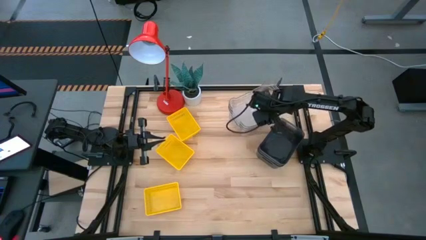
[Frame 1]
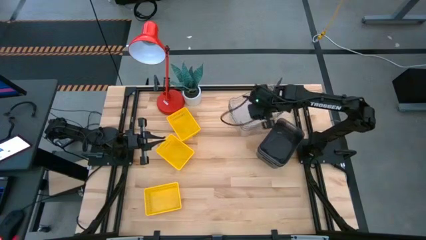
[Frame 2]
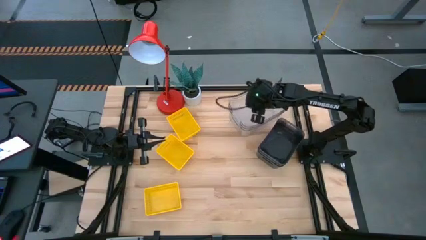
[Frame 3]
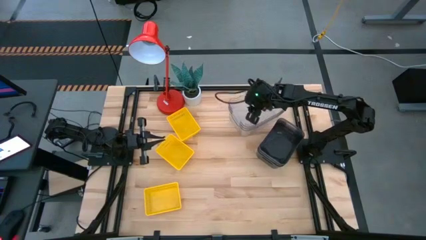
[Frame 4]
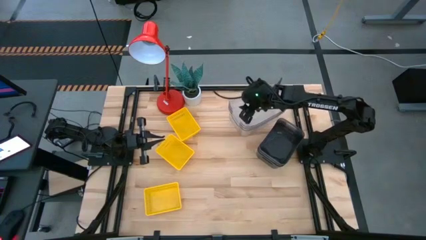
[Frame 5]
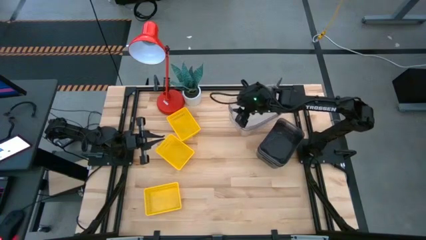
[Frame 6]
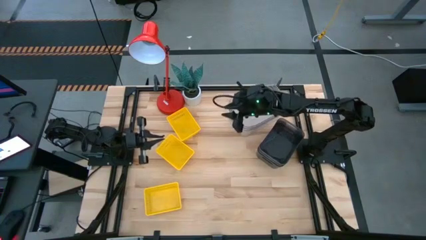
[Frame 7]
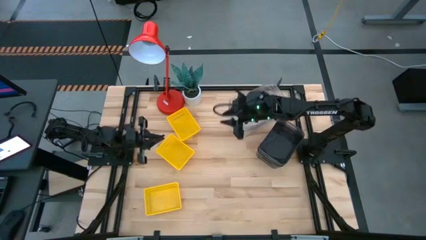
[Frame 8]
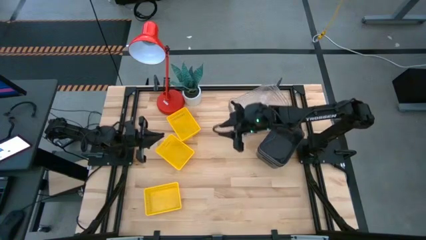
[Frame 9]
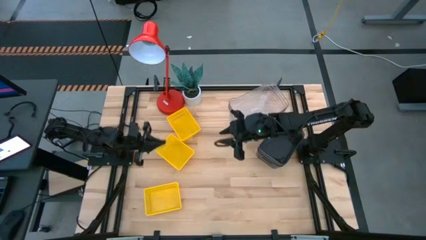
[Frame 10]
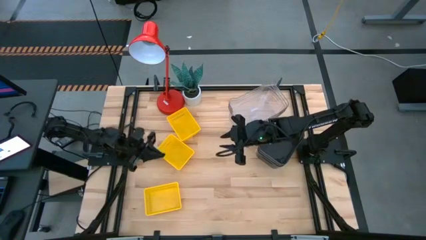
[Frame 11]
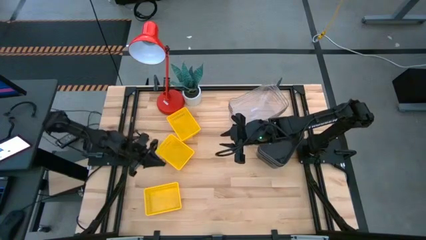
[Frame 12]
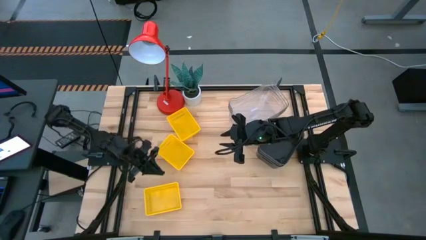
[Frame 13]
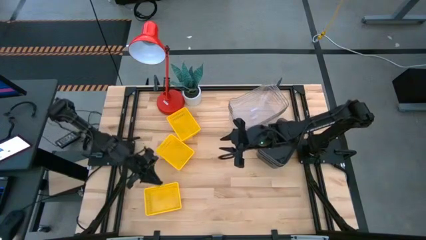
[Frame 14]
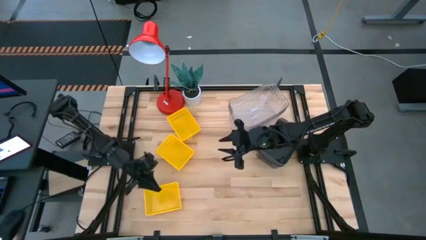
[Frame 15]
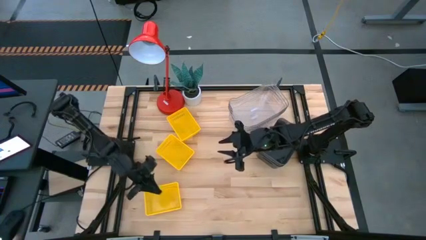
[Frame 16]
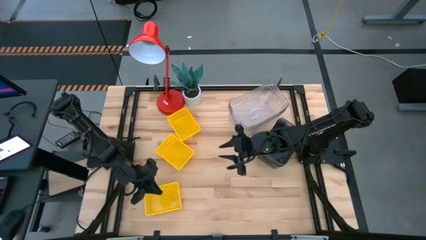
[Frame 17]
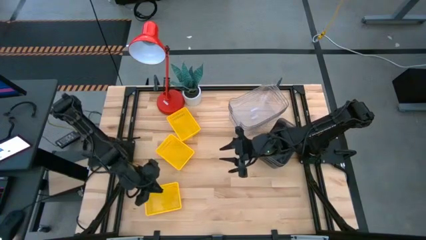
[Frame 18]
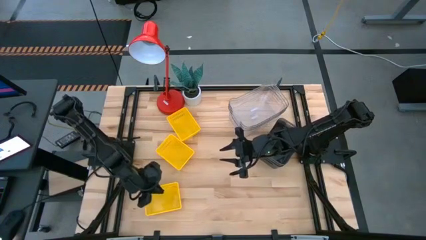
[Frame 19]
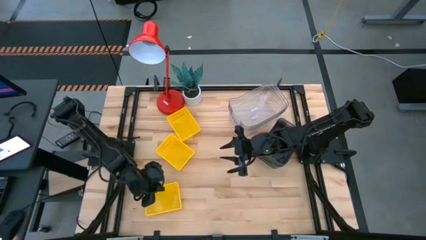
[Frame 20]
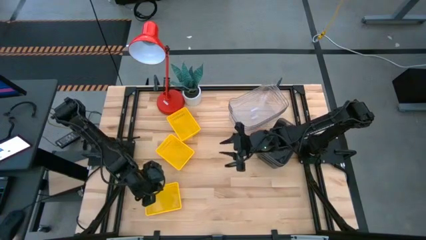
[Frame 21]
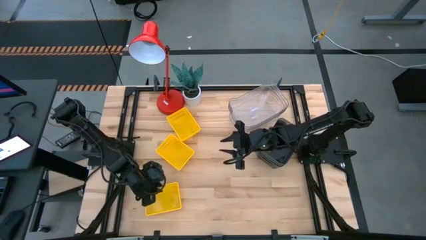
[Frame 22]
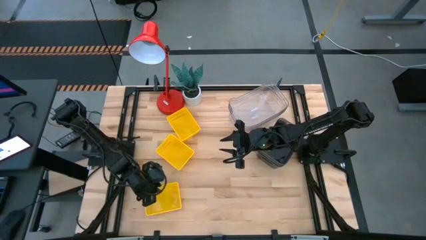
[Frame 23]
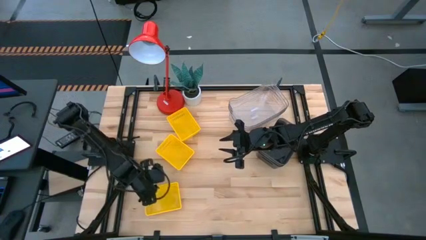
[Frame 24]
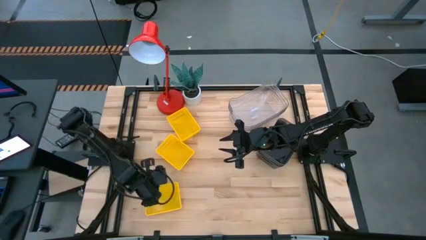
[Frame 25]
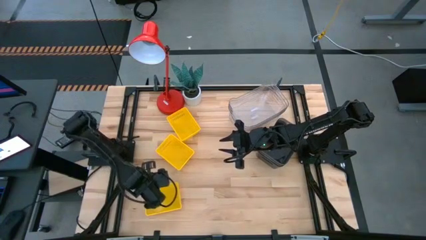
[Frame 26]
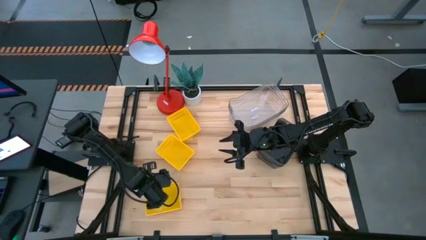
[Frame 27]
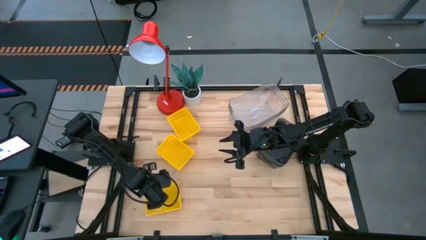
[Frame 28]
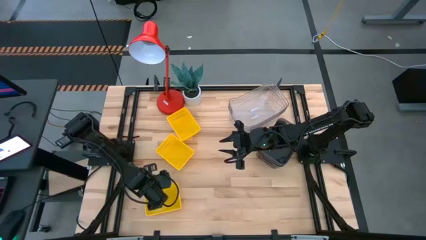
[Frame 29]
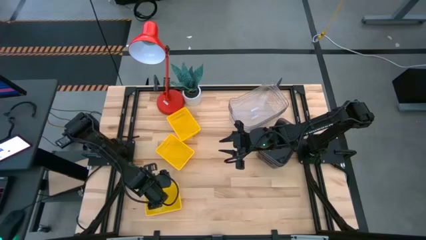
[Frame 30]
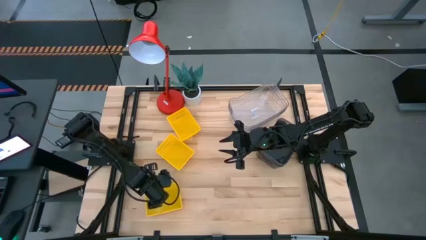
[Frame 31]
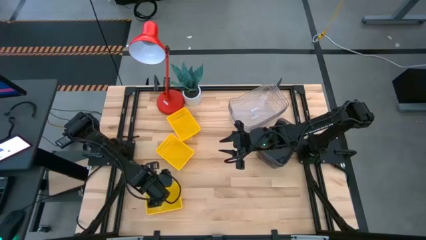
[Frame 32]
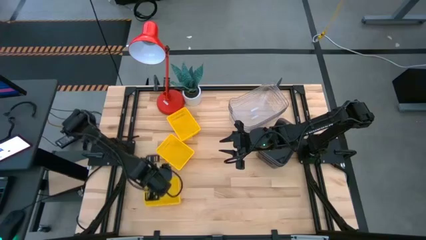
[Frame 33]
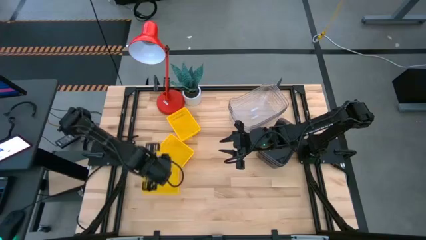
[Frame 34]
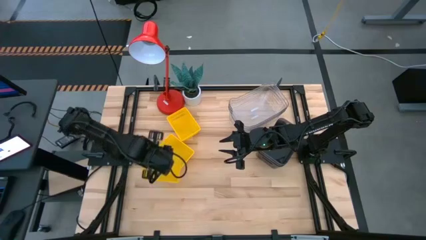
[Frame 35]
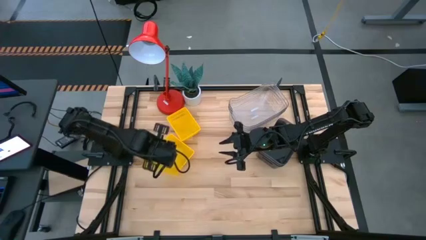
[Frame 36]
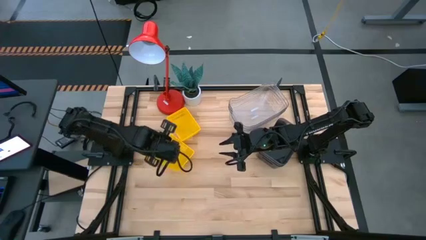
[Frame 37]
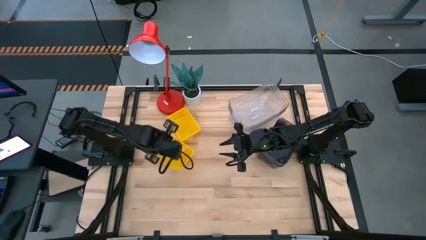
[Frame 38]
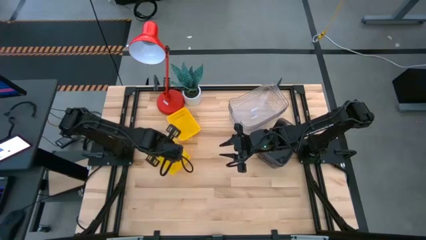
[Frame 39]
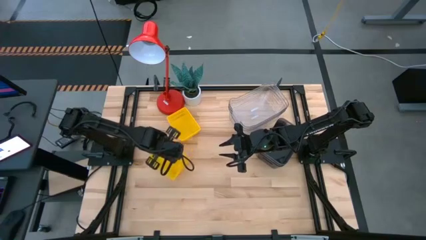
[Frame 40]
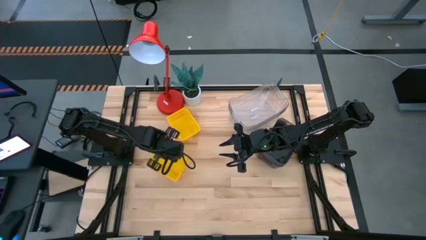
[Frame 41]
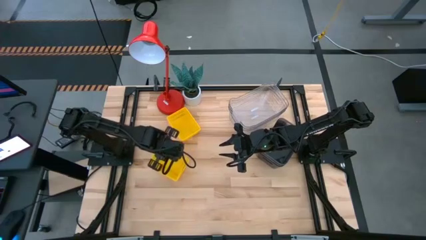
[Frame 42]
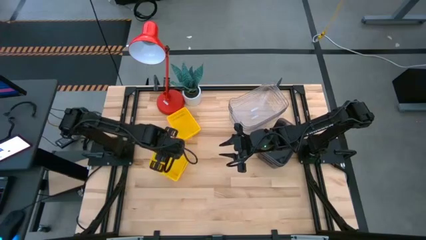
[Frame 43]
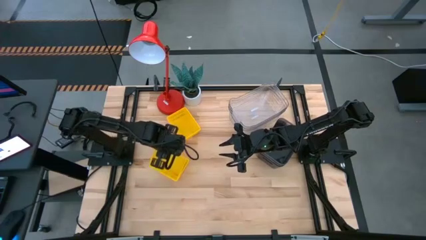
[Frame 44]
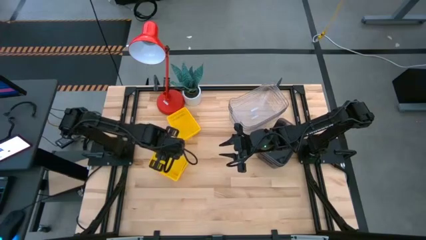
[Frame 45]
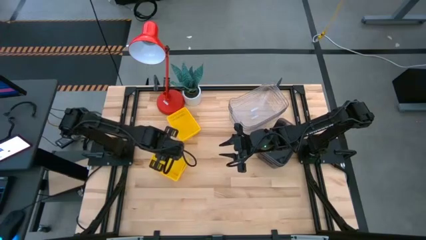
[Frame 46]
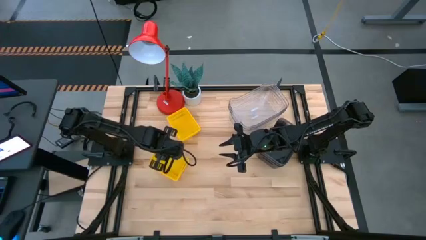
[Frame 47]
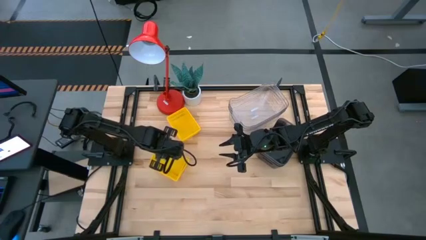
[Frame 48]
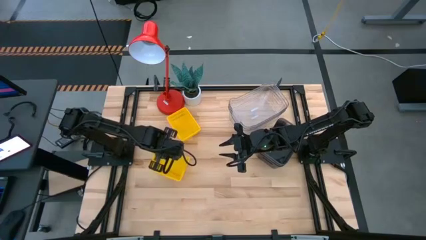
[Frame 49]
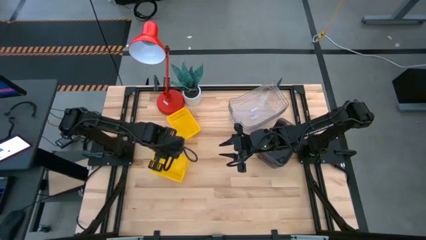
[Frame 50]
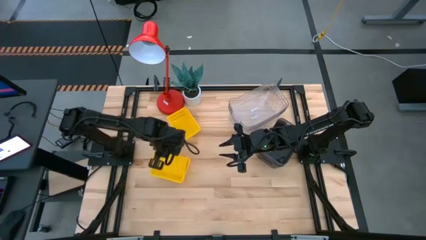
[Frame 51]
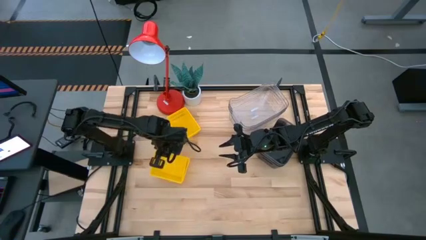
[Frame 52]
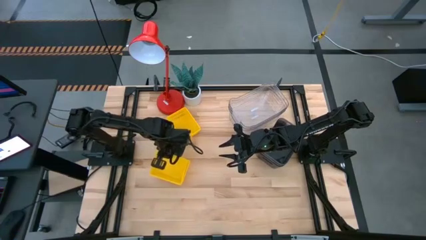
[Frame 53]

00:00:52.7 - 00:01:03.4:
Stack the bottom yellow bin on the middle yellow bin

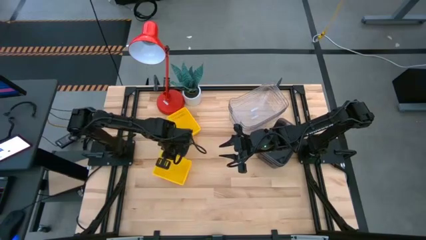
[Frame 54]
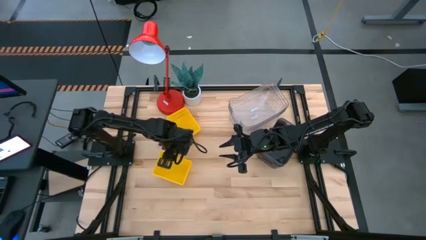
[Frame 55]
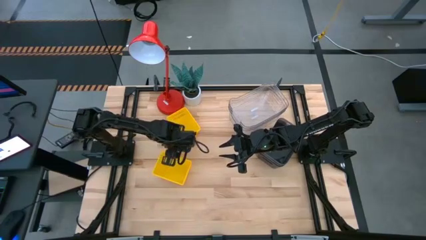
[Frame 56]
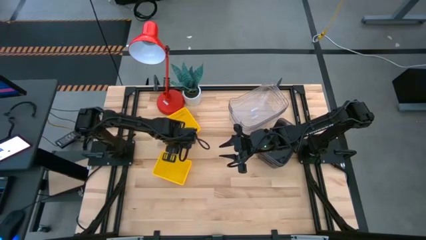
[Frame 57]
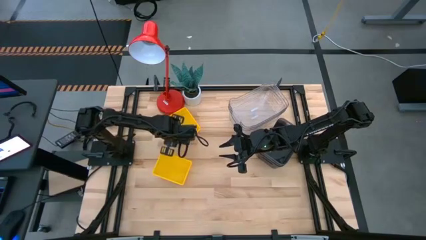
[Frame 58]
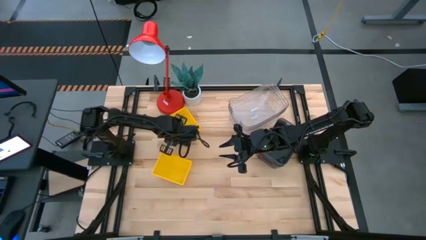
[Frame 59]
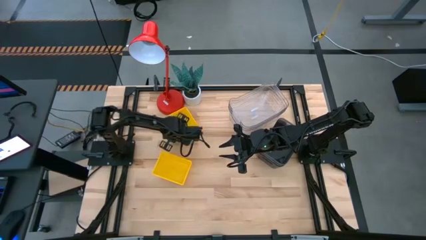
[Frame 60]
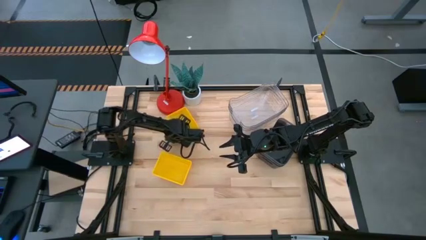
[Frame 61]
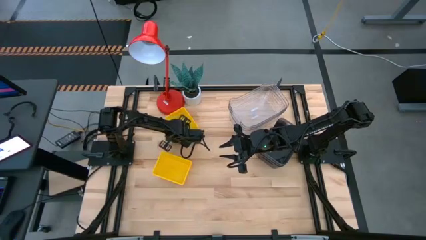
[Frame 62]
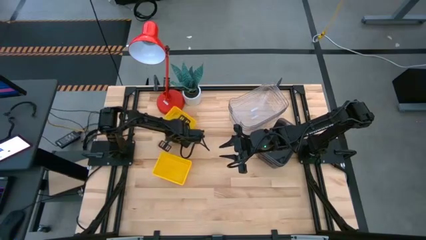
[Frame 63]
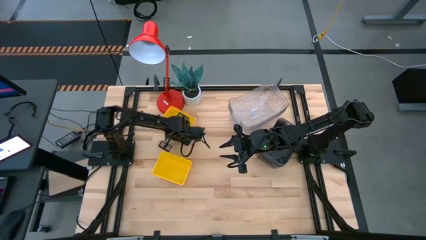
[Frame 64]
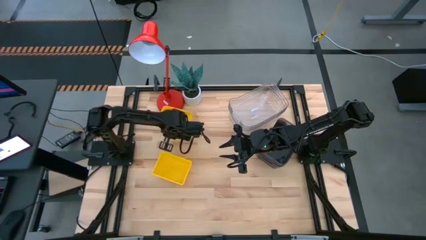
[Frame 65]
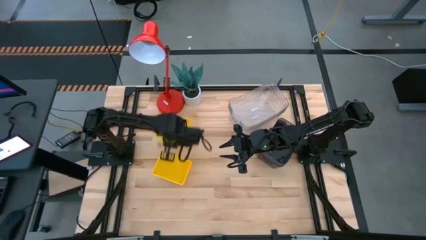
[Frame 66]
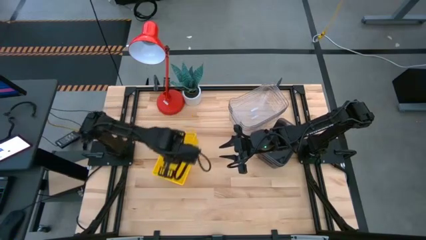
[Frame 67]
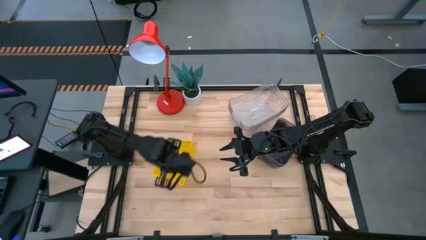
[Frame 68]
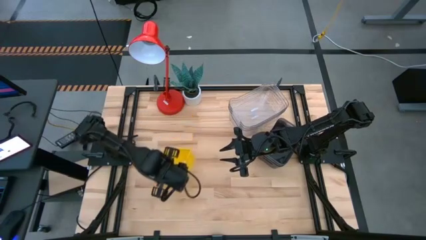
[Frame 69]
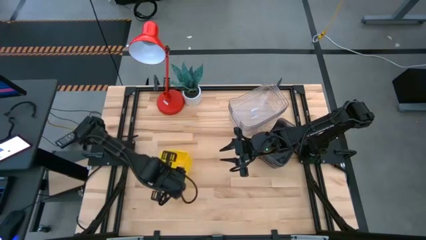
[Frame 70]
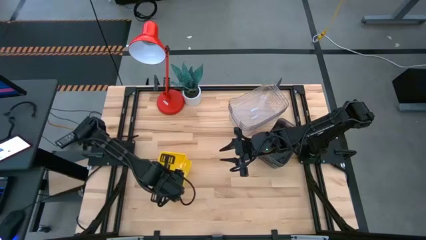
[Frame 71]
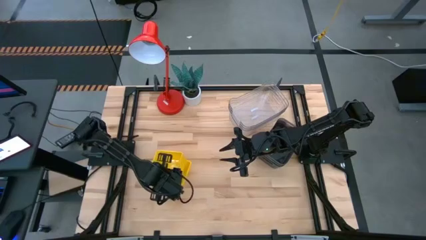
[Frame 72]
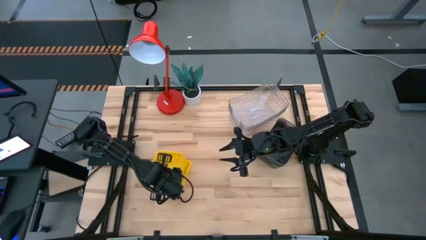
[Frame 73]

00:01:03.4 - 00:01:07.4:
Stack the top yellow bin on the stacked yellow bins
